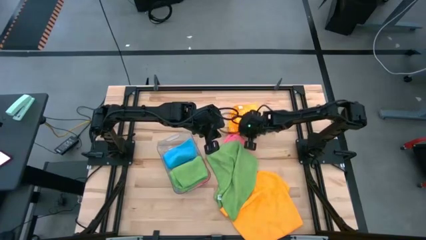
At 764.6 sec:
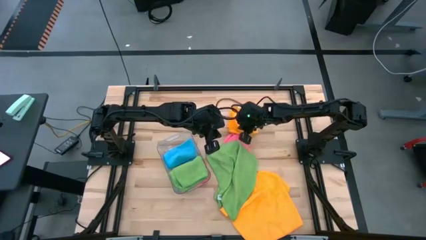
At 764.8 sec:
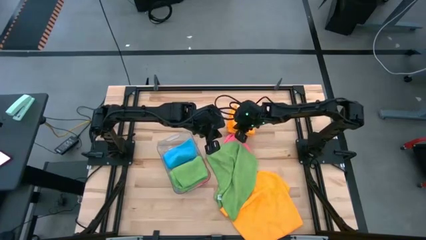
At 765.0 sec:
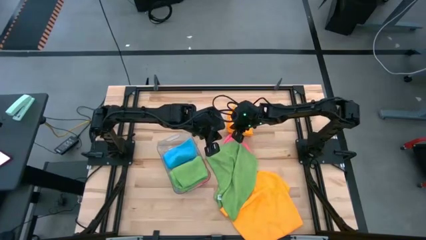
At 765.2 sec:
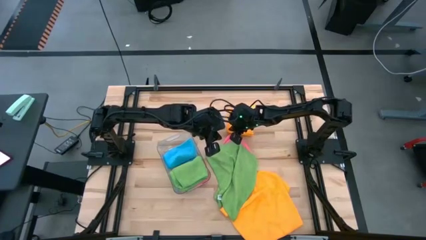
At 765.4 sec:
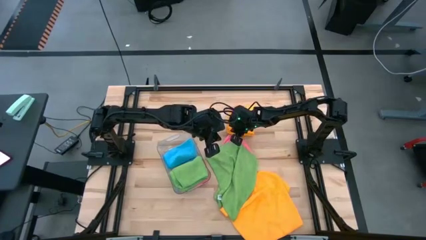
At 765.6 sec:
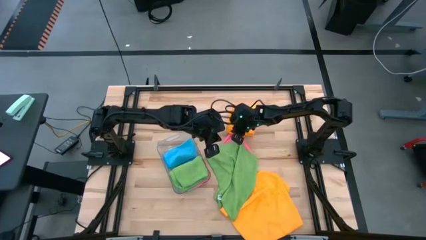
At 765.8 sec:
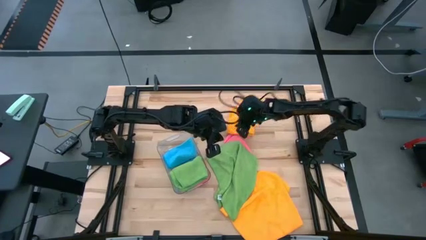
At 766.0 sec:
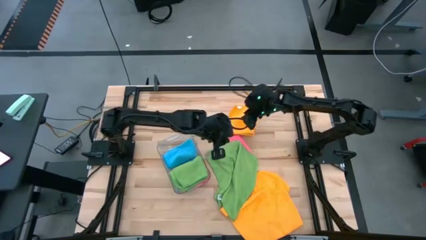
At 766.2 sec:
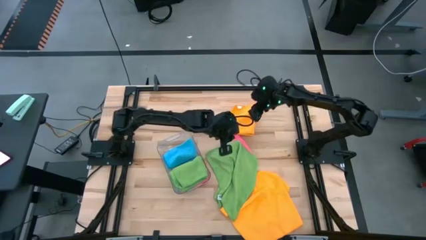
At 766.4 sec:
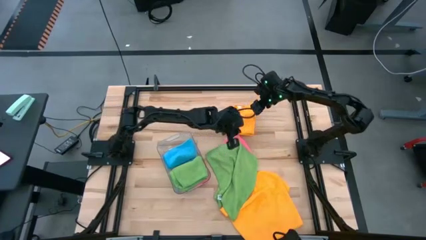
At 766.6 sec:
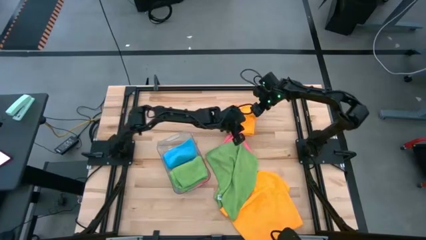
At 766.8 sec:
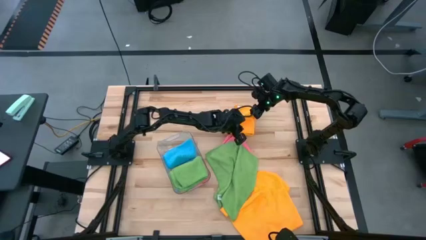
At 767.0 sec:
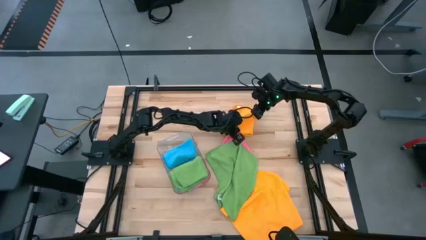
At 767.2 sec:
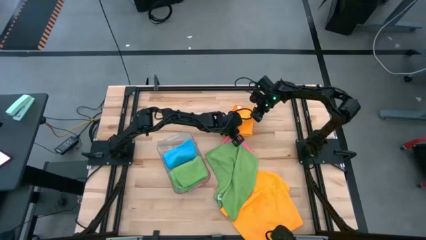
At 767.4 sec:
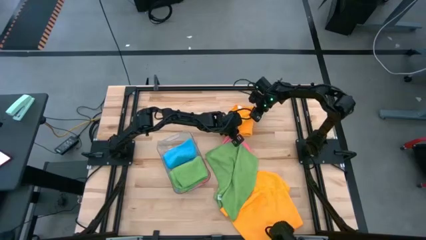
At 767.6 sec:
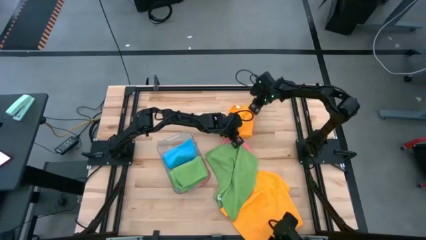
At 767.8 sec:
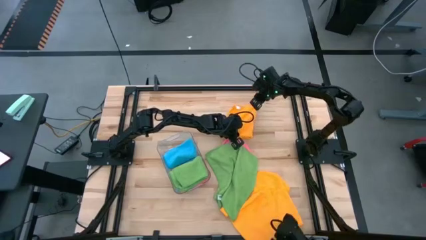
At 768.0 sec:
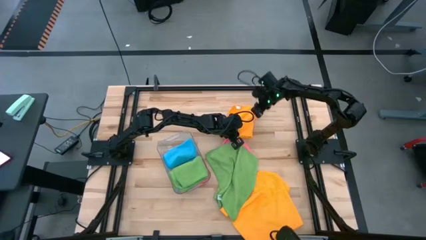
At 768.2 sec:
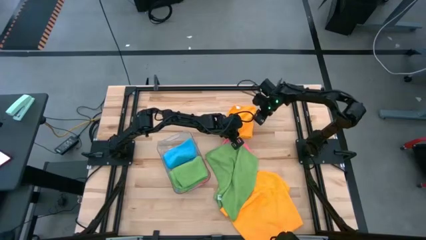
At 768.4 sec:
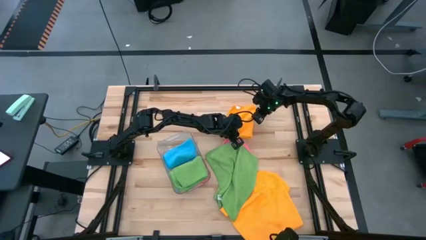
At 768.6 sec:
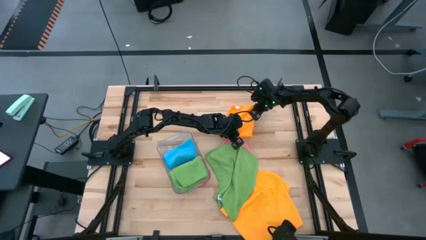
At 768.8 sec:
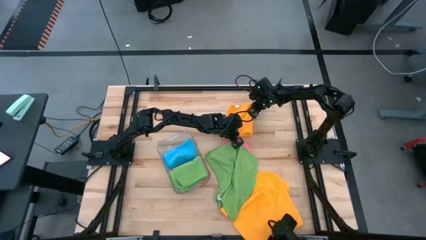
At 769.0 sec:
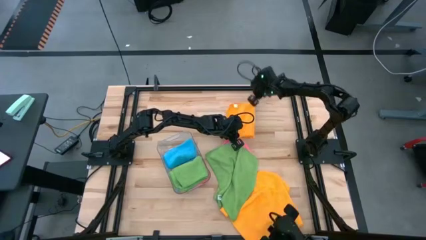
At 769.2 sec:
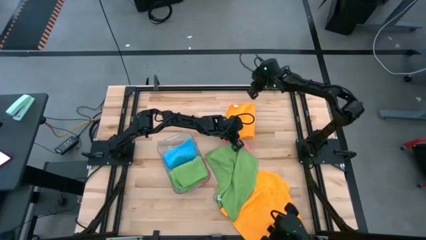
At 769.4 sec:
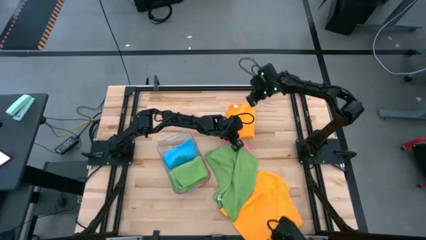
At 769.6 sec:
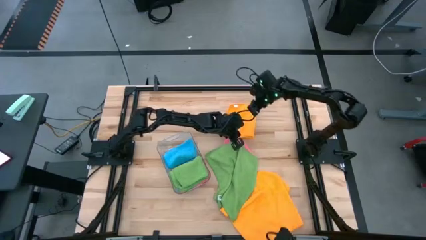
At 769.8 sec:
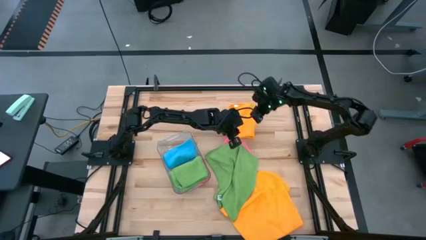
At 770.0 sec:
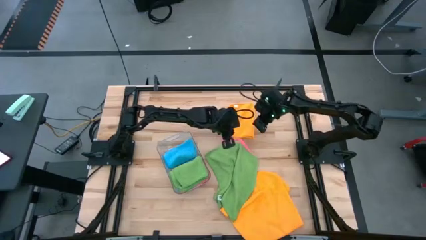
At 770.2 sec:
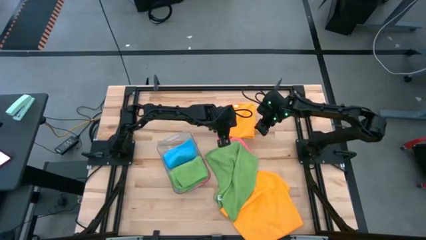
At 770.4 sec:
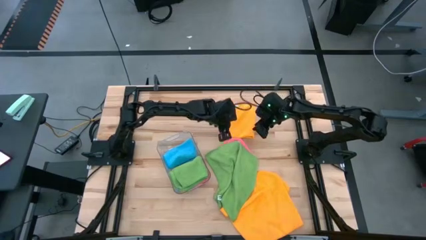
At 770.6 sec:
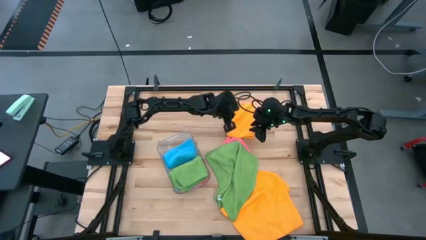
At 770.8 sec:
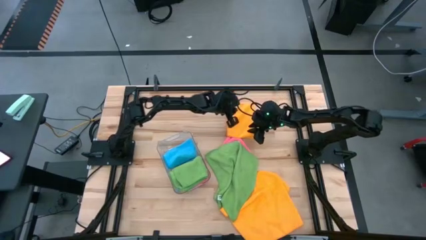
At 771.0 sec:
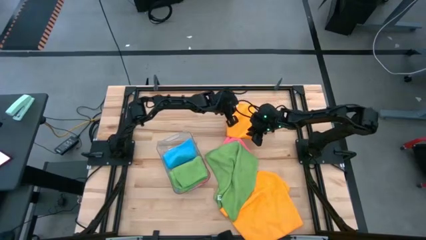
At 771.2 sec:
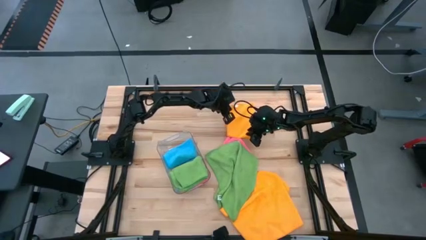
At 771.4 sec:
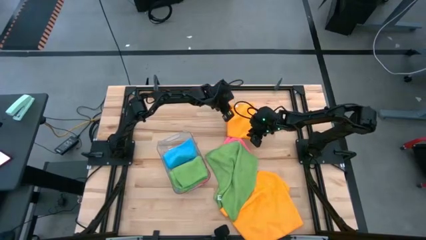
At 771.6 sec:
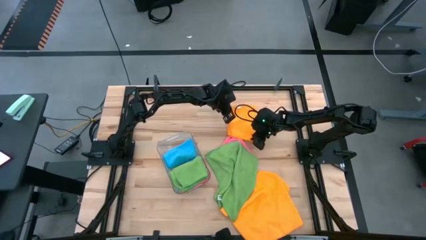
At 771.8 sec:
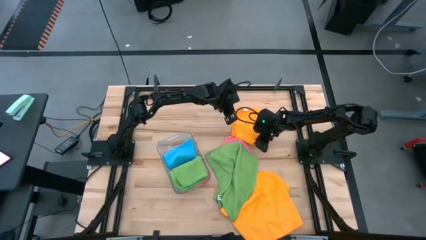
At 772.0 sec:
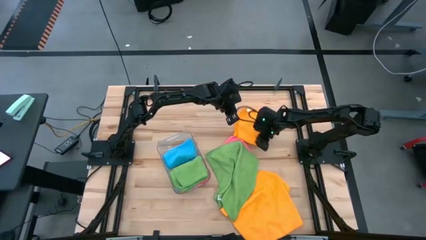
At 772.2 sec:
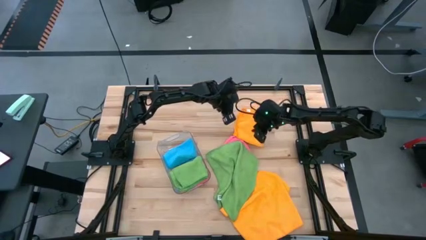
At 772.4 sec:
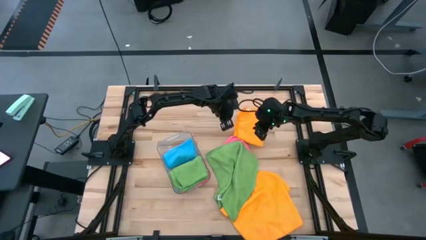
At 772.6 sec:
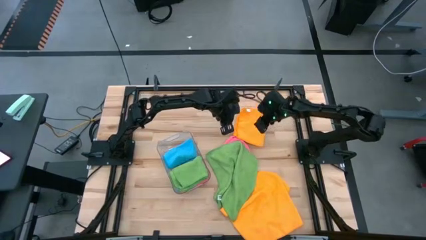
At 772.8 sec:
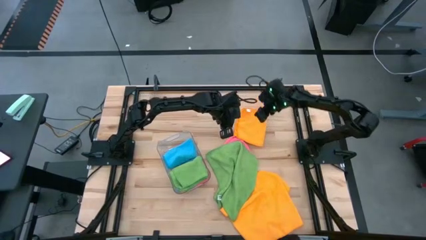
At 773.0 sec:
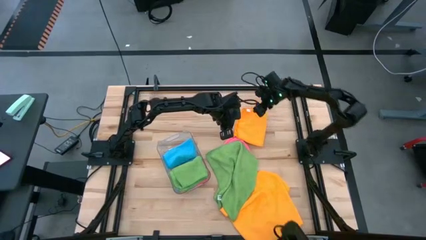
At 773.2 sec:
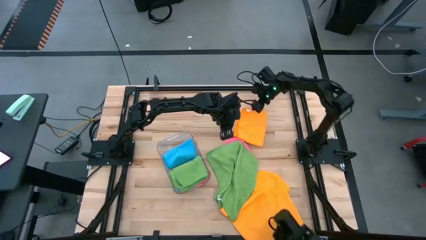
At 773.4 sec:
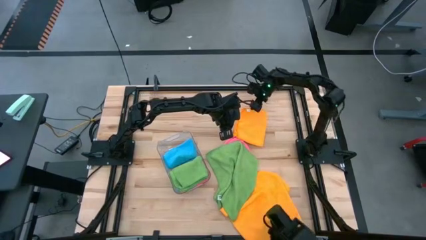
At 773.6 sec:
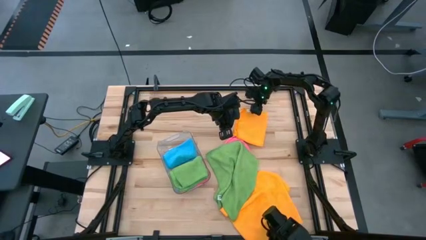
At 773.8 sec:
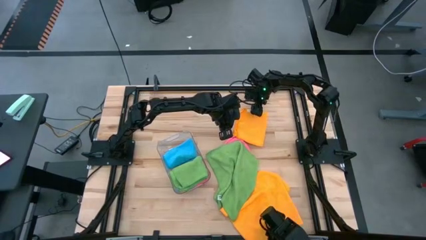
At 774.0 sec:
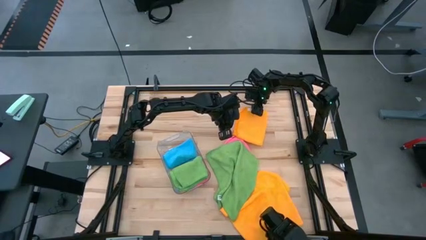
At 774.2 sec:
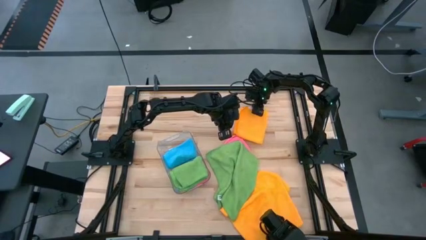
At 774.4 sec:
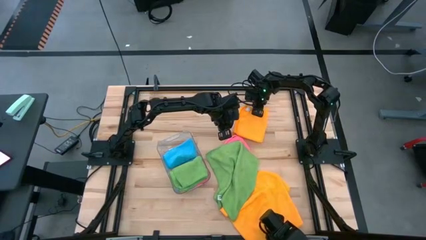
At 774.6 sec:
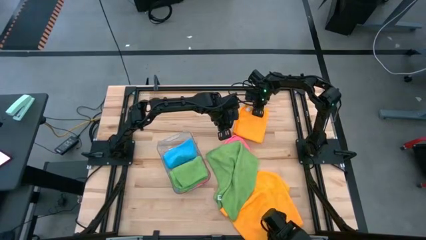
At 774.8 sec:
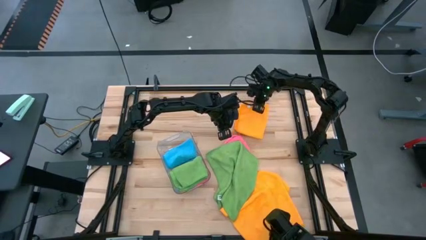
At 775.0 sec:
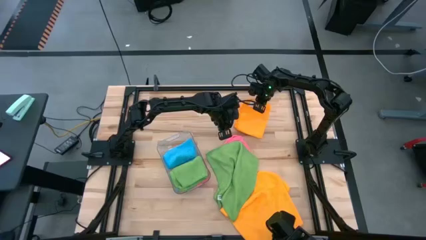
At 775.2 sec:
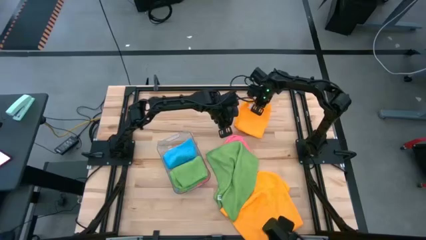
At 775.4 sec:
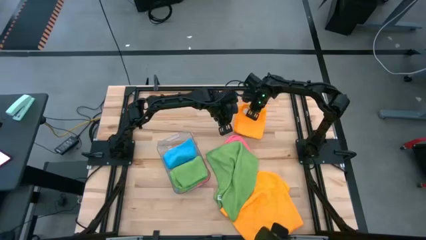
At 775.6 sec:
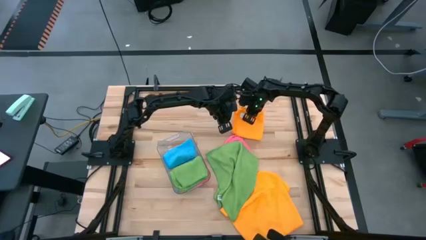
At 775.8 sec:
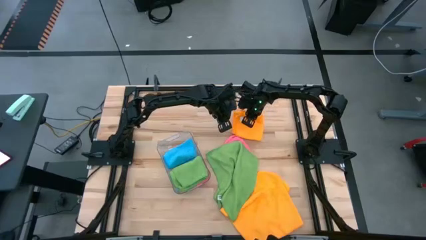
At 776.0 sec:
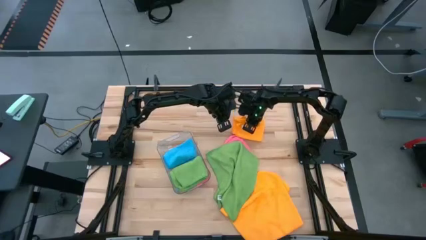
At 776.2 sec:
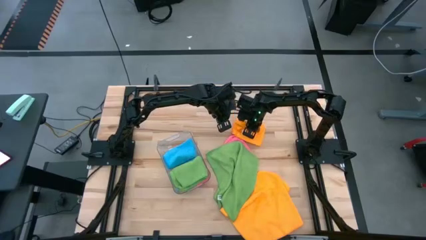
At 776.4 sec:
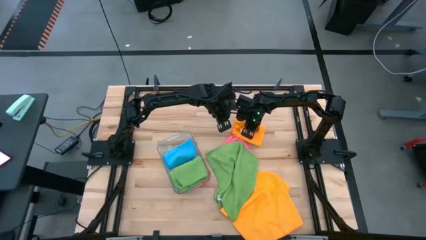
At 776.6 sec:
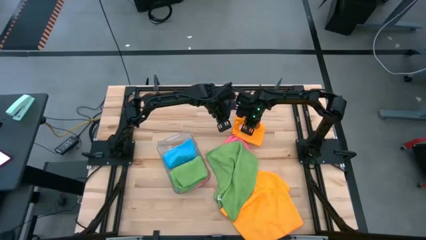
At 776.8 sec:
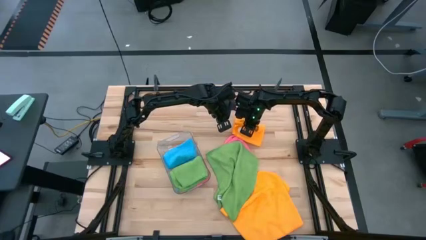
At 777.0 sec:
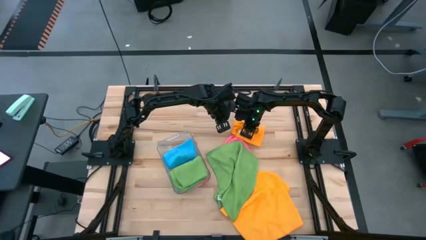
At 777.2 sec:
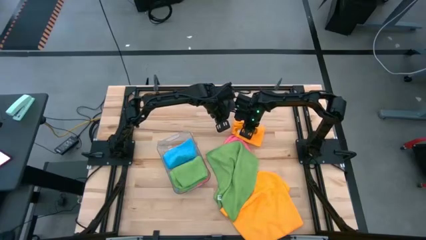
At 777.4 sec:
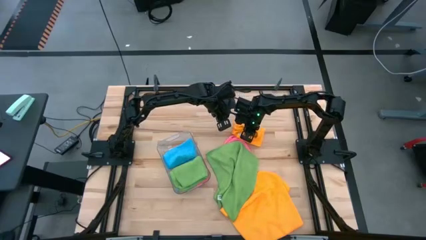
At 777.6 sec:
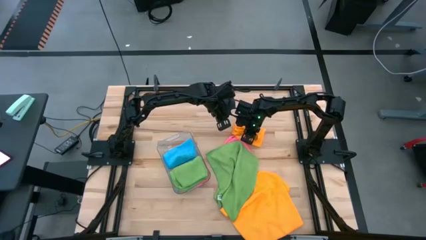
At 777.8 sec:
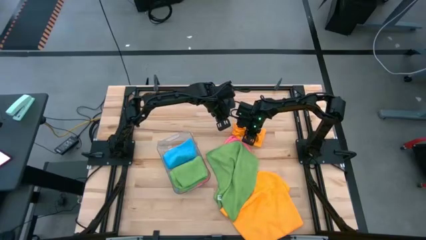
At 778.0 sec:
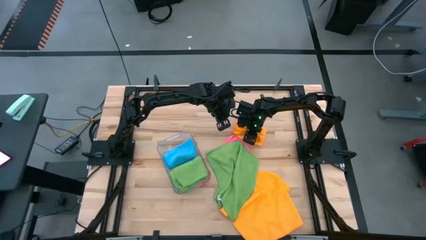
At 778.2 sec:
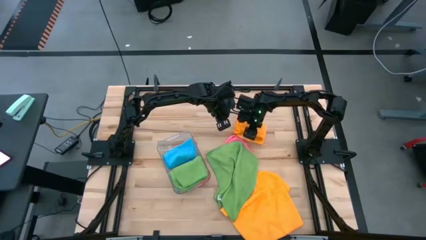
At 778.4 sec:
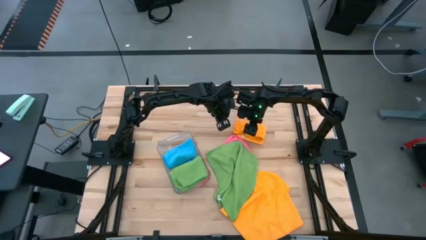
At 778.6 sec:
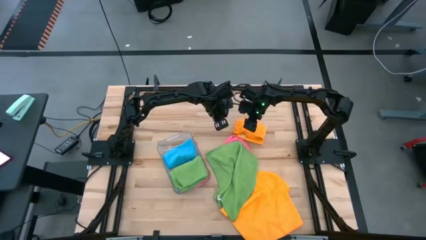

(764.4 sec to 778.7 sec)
Task: Fold microfiber towels
Fold the left yellow towel
